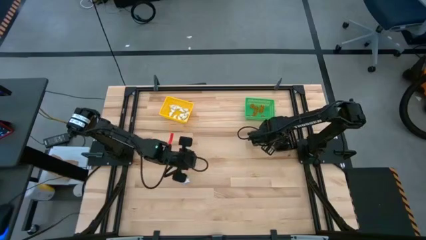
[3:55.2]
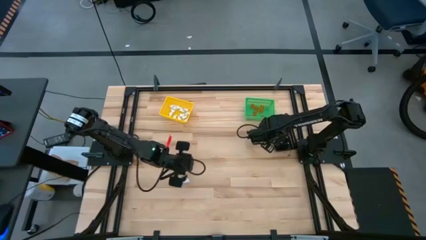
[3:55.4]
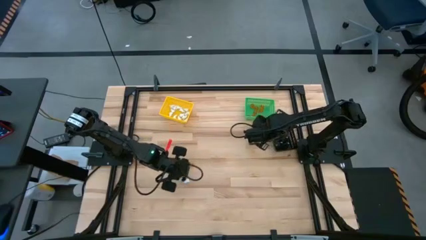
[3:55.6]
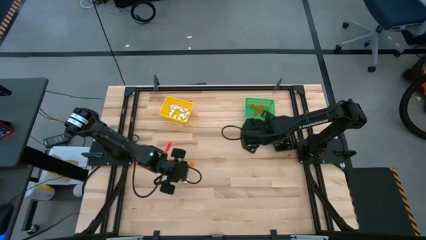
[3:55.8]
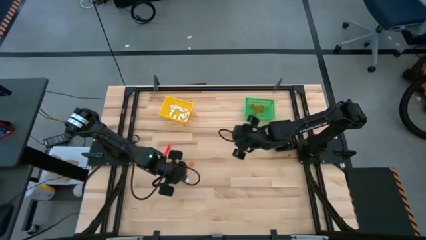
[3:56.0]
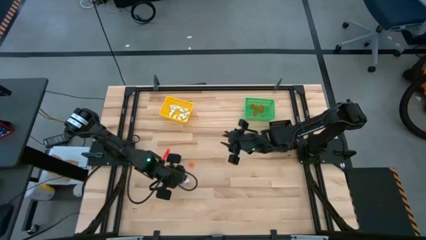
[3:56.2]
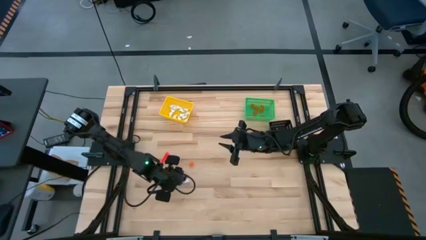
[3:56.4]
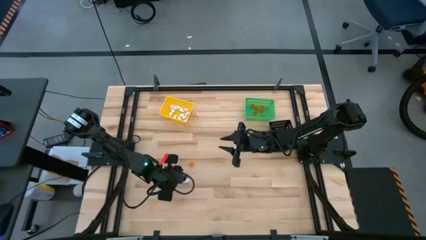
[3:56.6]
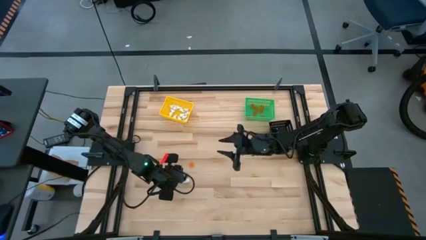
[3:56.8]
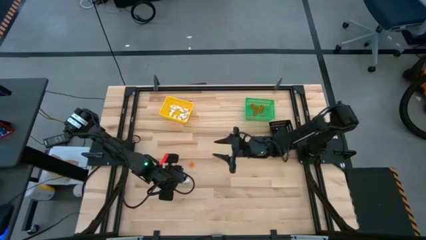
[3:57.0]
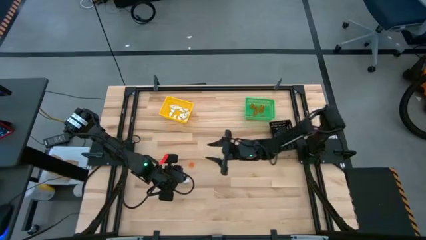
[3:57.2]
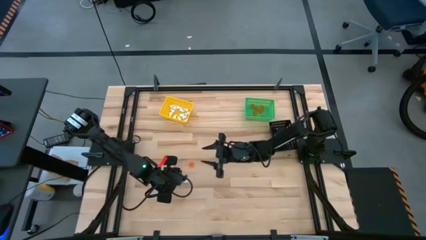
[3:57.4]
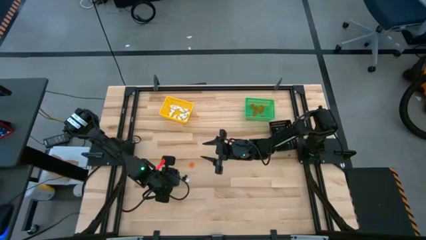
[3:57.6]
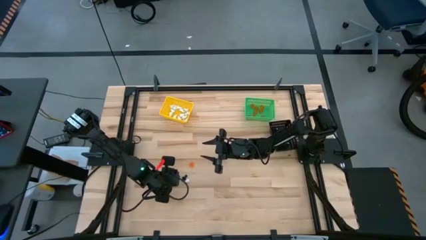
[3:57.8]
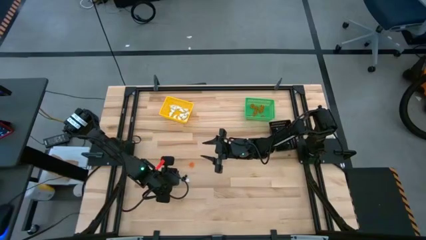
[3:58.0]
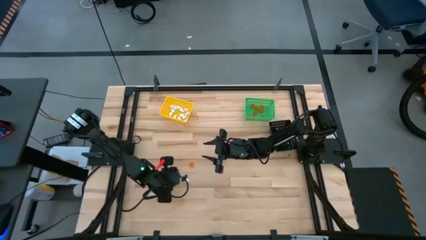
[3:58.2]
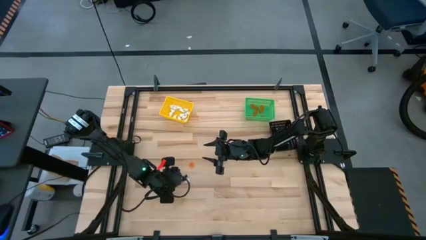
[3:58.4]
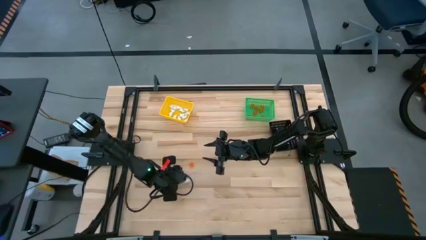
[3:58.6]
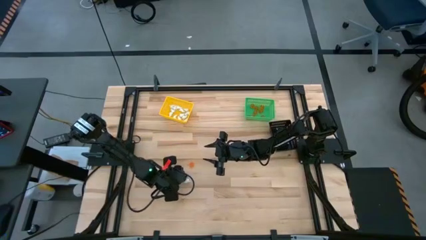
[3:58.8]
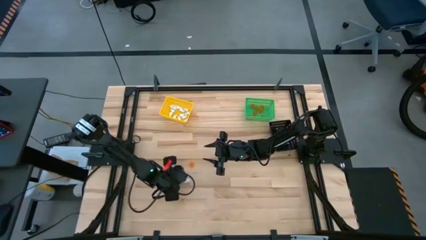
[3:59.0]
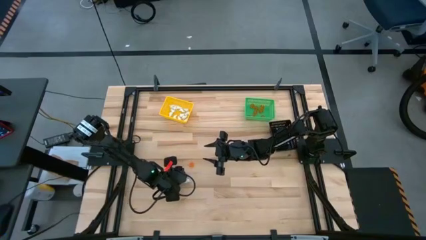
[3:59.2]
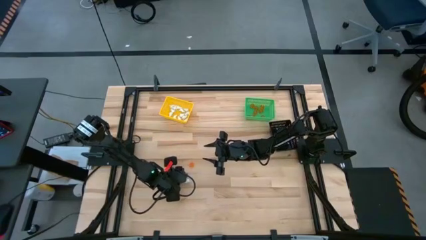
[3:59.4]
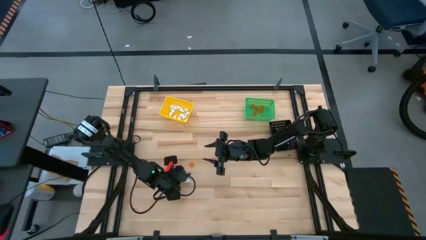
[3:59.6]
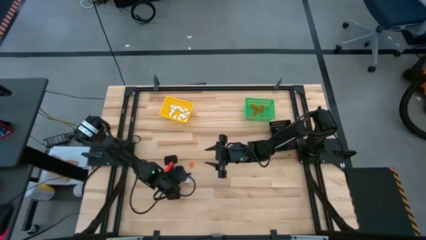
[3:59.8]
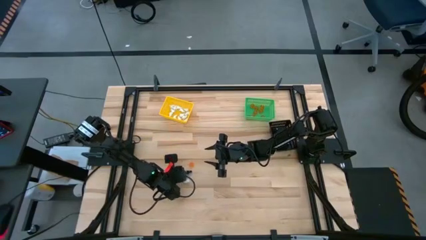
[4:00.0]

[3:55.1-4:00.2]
Task: Sort Halloween decoration
Put the black skeleton toy into the black bin

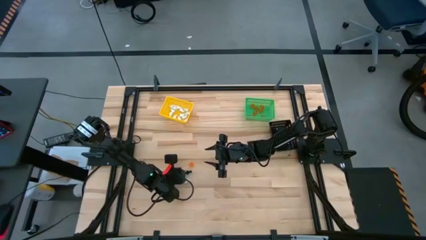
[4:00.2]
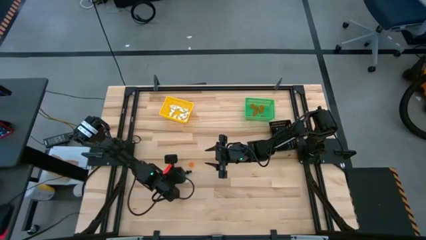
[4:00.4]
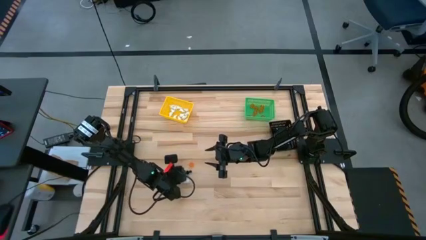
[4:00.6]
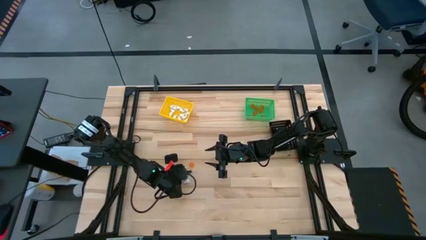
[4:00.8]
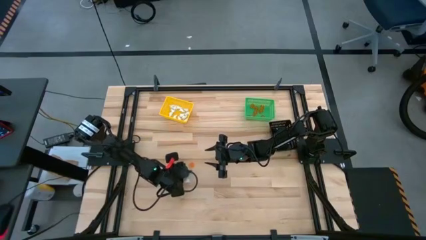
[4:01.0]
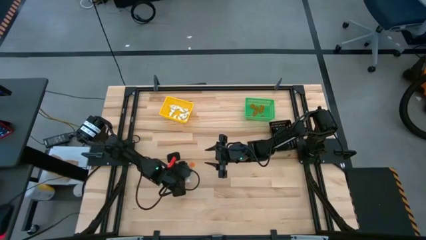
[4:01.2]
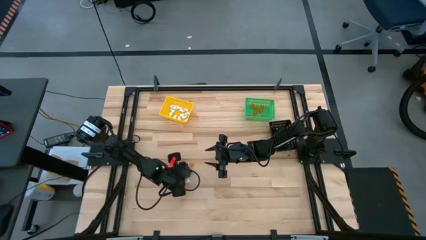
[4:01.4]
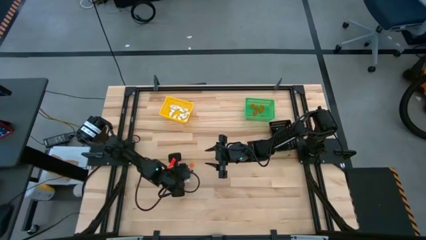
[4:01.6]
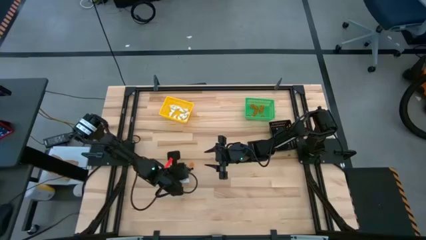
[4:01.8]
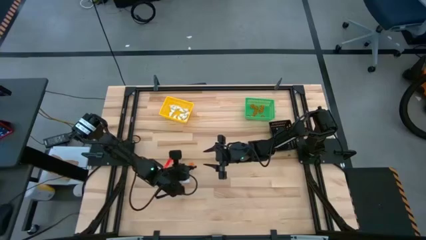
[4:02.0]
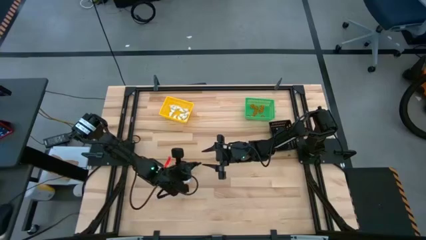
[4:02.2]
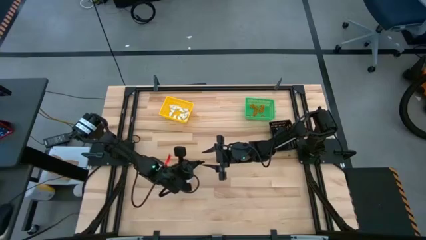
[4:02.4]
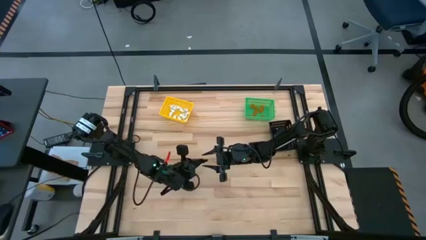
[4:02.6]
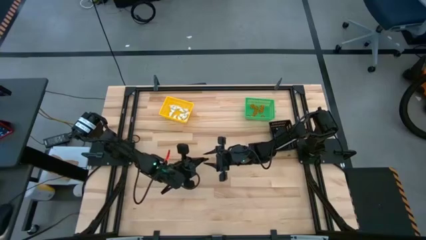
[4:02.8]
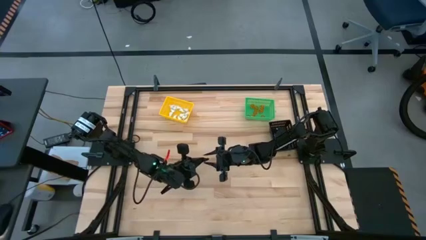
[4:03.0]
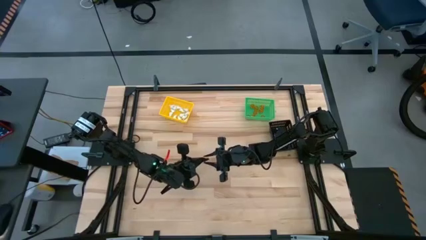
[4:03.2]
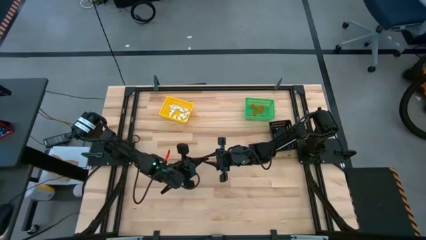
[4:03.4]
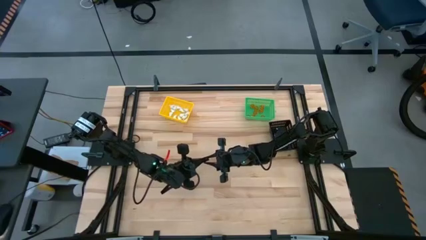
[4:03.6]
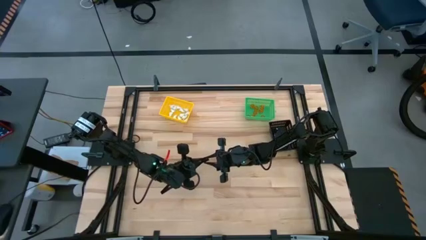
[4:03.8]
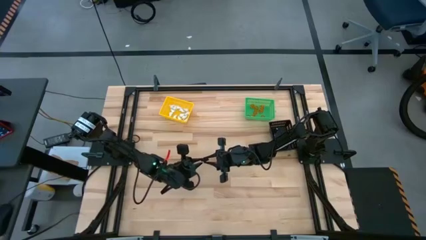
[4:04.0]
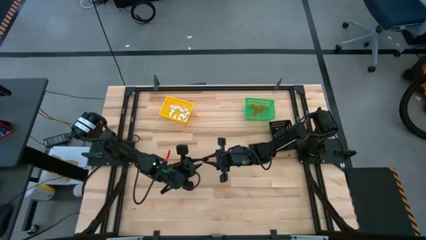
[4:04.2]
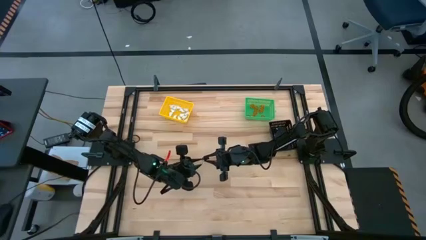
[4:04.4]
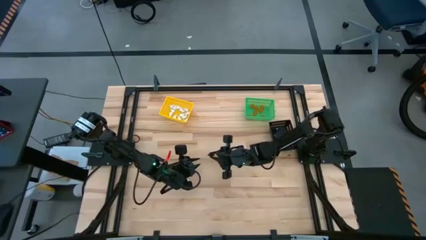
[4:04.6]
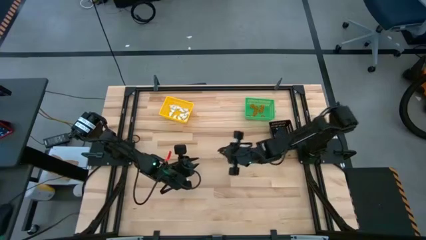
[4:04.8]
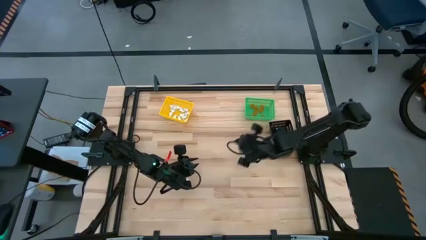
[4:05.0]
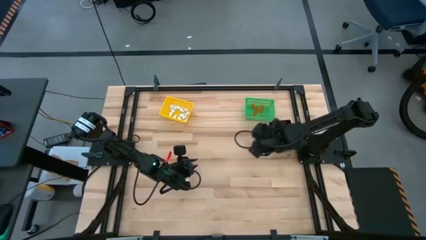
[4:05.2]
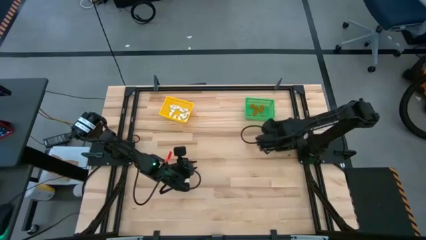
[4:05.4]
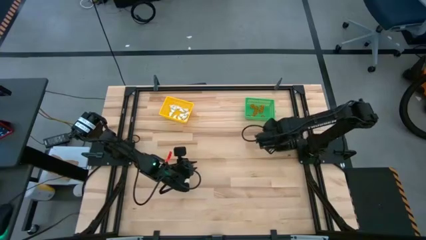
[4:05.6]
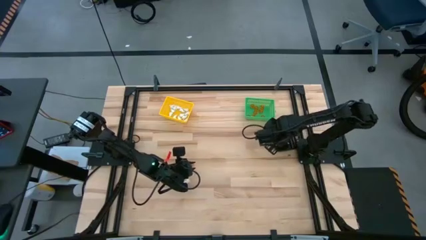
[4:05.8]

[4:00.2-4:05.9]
Put the black skeleton toy into the black bin

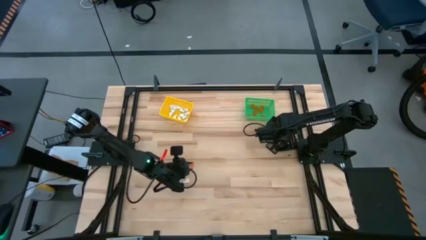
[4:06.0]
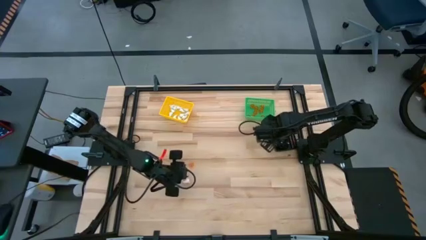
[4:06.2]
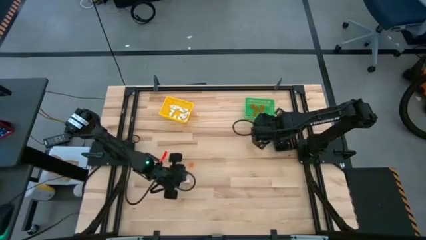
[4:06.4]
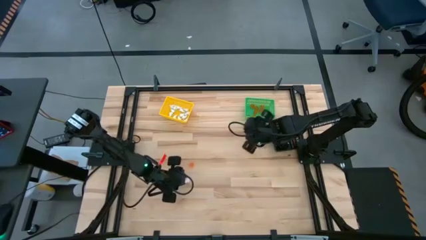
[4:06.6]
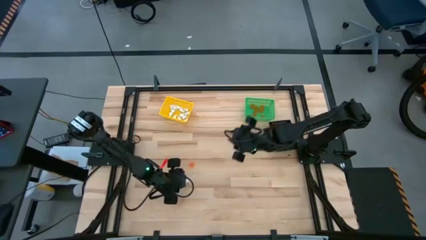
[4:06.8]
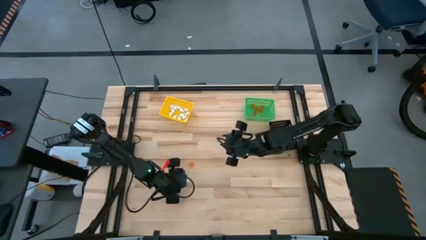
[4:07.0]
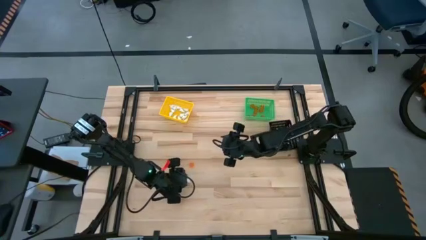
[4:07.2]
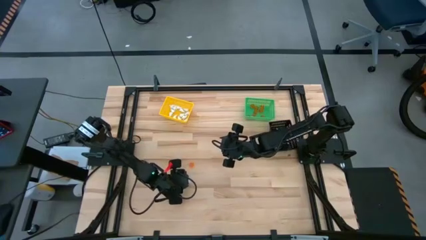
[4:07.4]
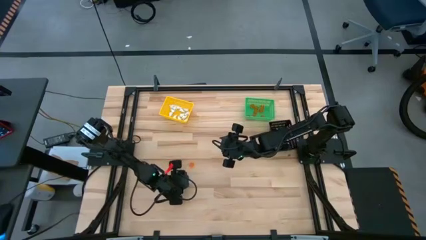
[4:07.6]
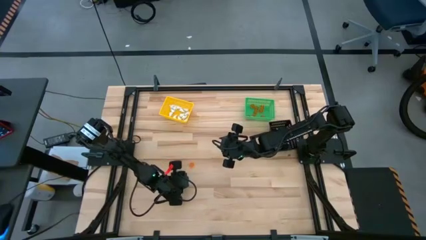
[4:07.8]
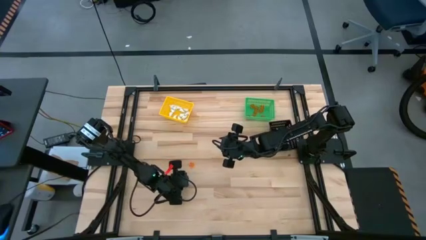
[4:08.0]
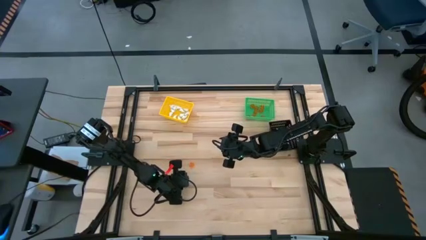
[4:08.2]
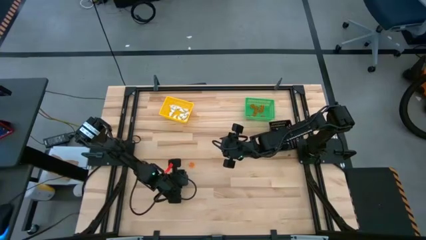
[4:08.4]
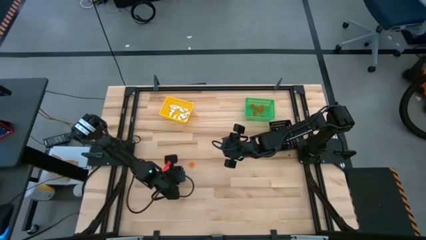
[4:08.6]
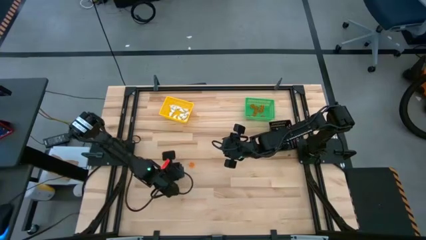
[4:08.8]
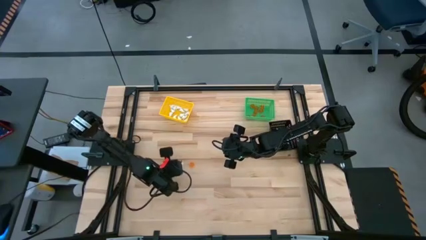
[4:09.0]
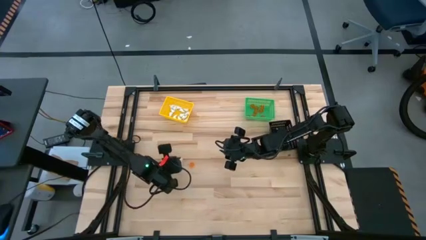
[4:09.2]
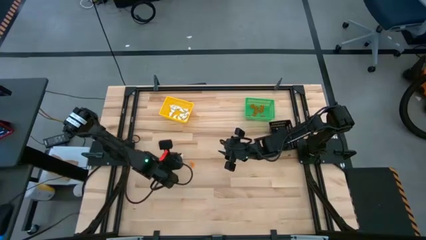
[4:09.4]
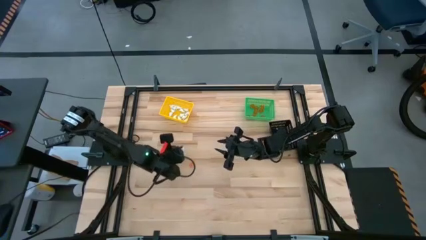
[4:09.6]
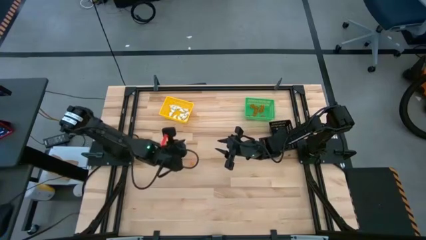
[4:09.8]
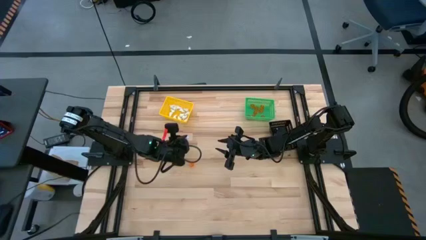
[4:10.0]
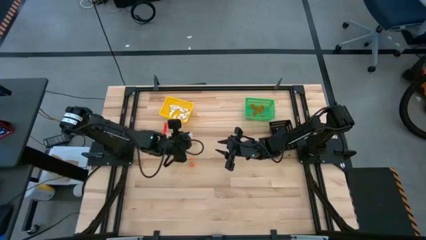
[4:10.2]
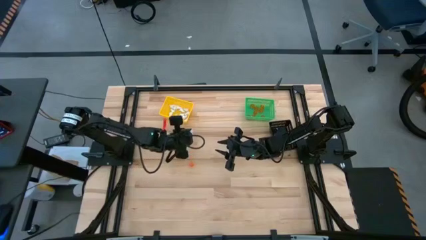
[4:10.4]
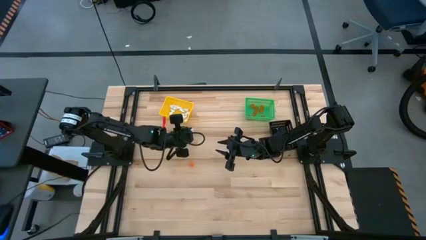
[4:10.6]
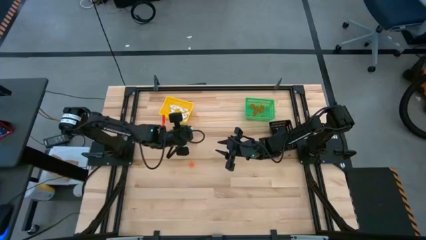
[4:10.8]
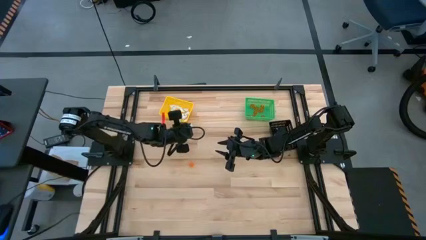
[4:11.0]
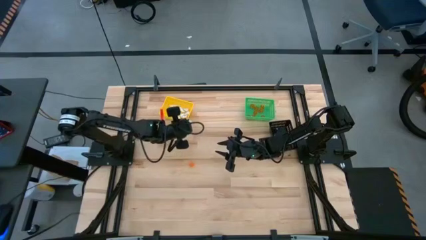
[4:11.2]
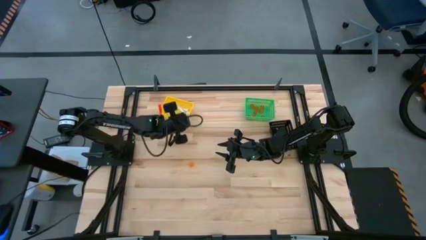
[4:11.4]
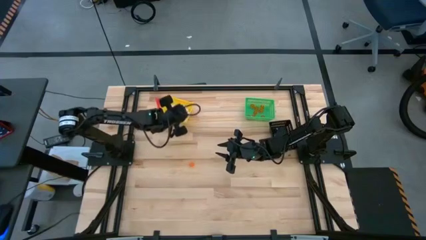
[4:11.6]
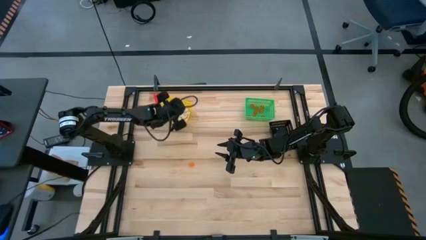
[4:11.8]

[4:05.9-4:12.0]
Put the white ghost toy into the yellow bin

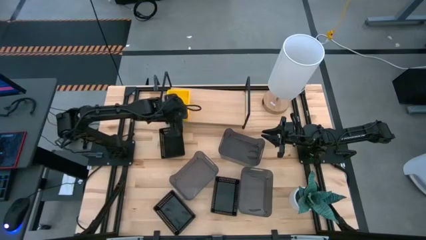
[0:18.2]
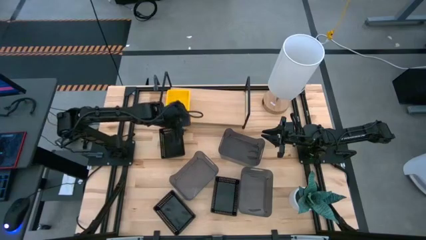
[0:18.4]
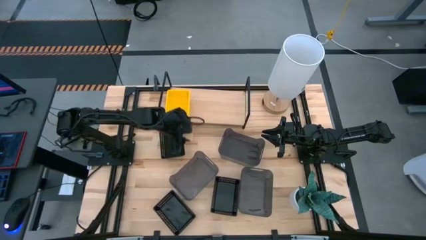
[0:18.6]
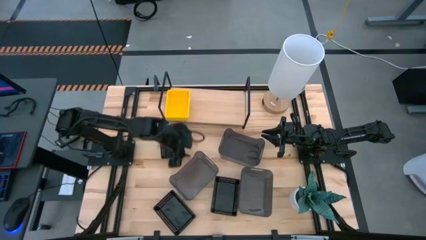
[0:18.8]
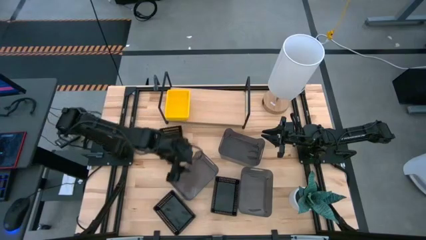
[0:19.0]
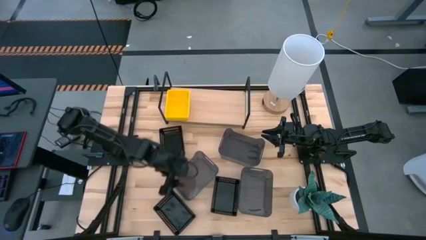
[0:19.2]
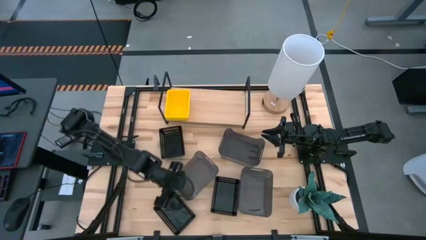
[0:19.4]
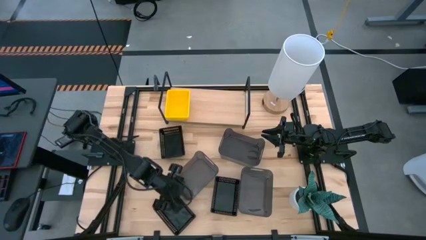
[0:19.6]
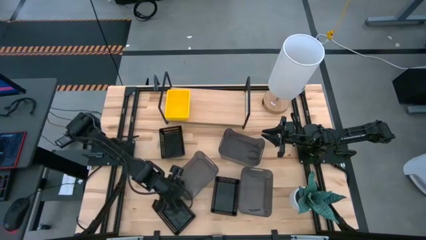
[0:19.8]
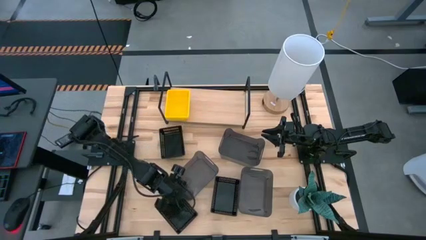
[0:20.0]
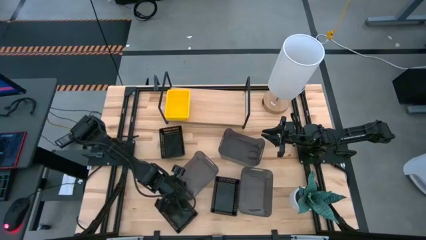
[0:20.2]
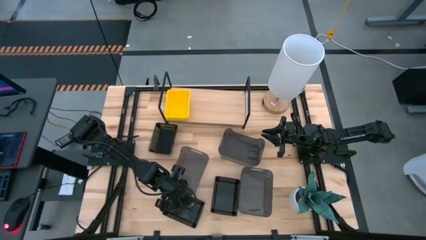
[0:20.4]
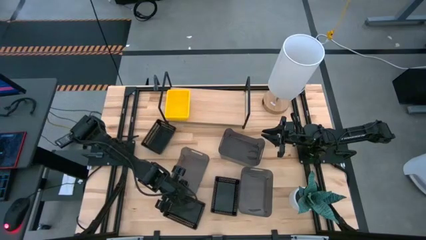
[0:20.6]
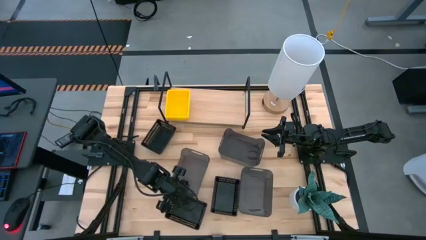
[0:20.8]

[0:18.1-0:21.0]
Task: Stack baskets on shelf by color
Stack the bottom left light black bin on the top light black bin
